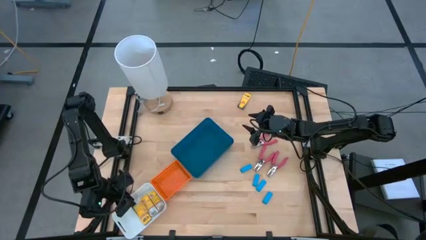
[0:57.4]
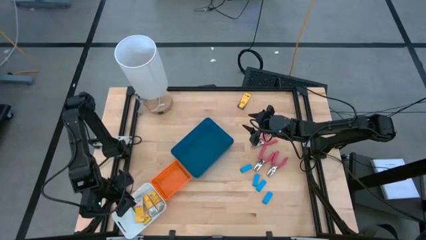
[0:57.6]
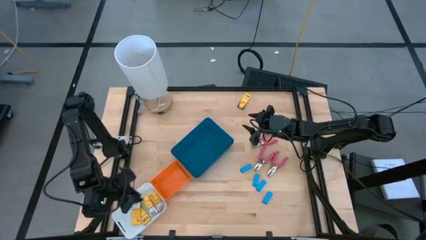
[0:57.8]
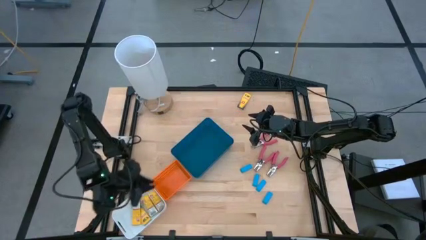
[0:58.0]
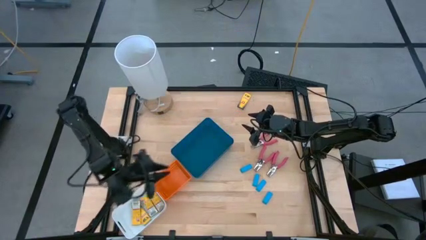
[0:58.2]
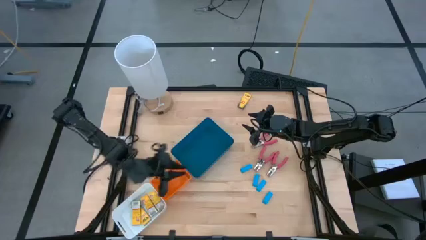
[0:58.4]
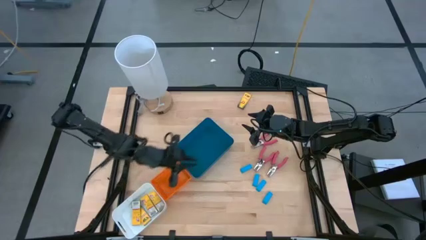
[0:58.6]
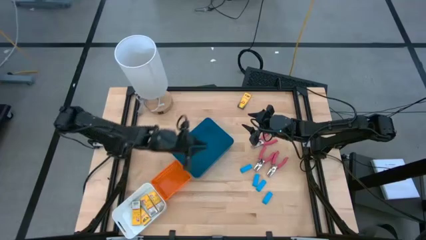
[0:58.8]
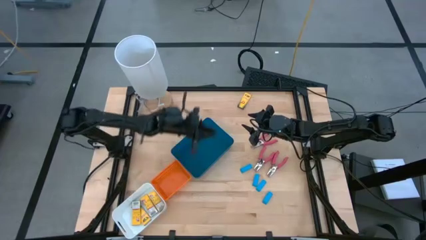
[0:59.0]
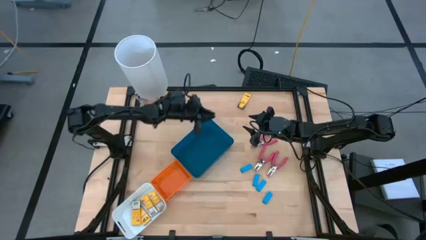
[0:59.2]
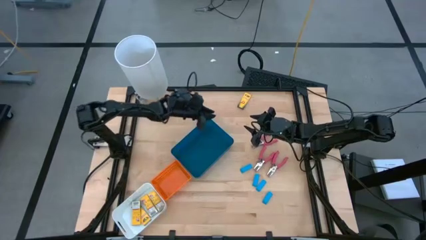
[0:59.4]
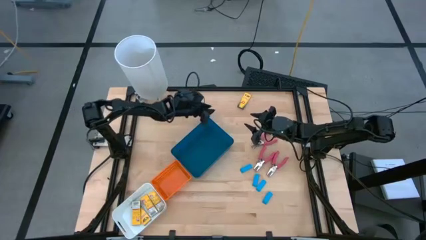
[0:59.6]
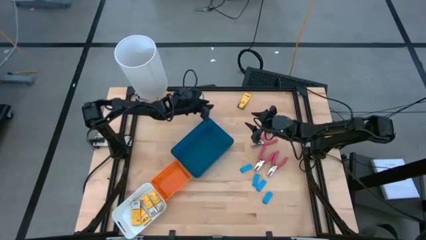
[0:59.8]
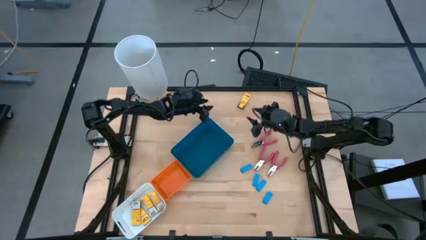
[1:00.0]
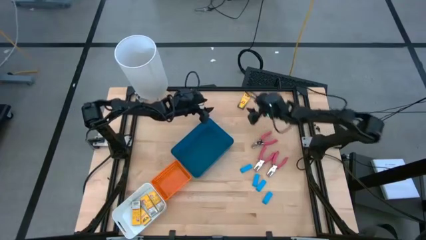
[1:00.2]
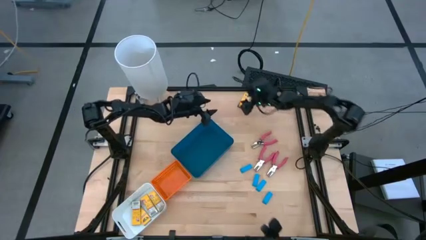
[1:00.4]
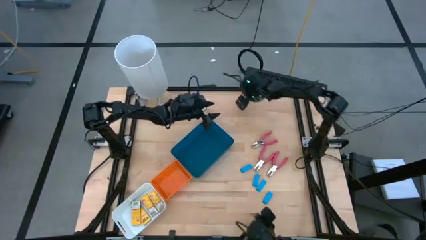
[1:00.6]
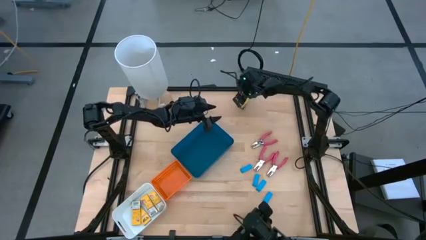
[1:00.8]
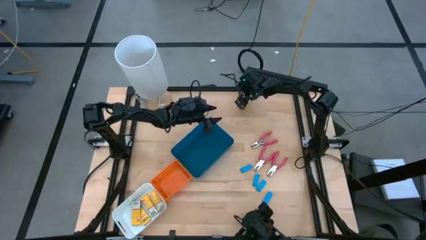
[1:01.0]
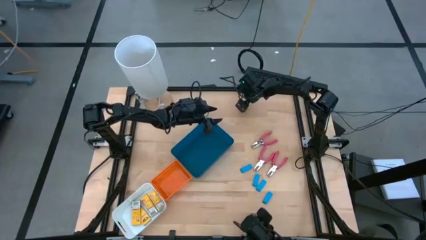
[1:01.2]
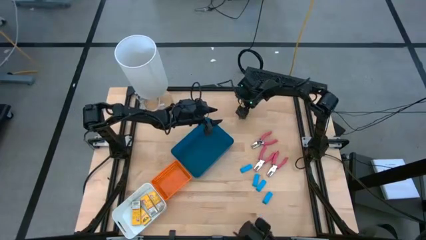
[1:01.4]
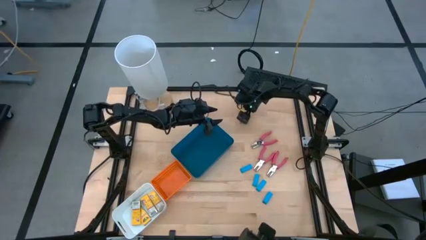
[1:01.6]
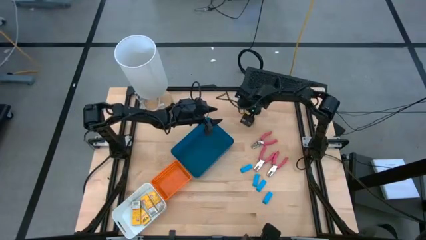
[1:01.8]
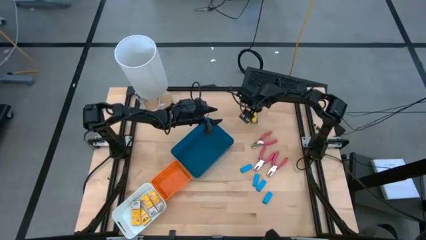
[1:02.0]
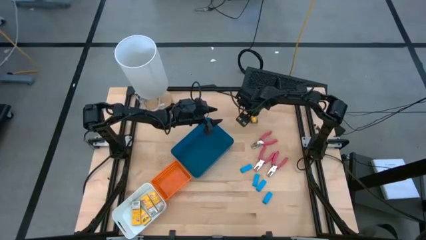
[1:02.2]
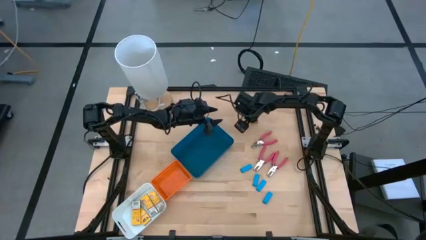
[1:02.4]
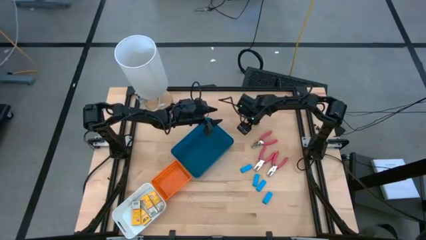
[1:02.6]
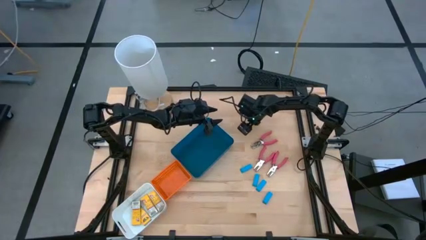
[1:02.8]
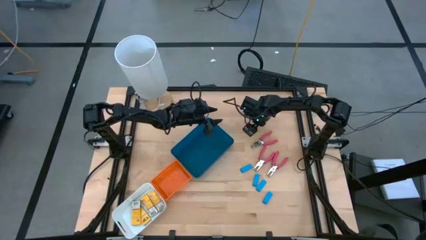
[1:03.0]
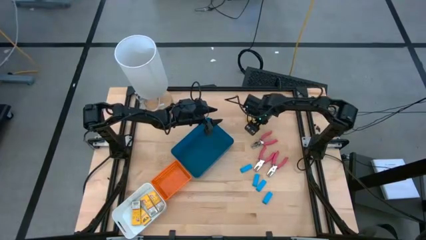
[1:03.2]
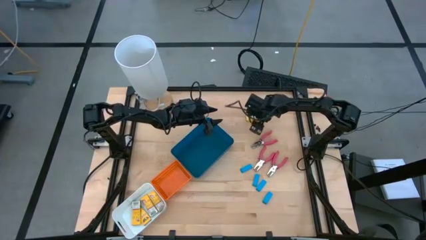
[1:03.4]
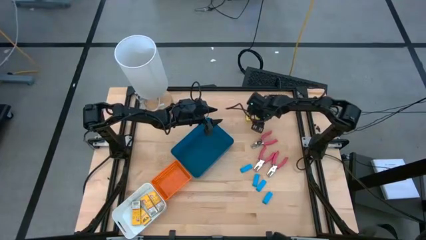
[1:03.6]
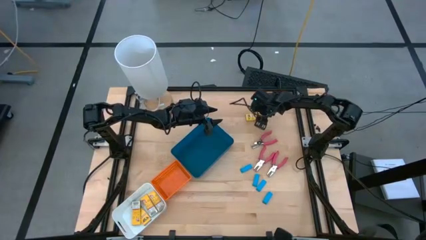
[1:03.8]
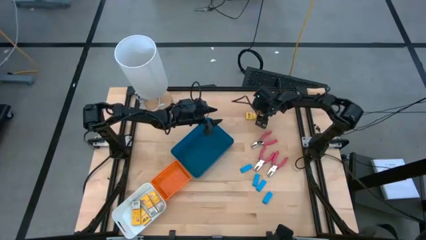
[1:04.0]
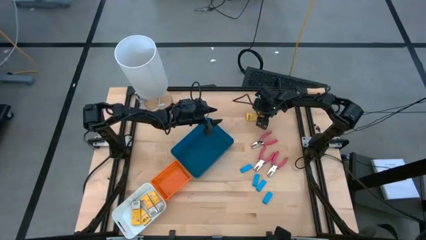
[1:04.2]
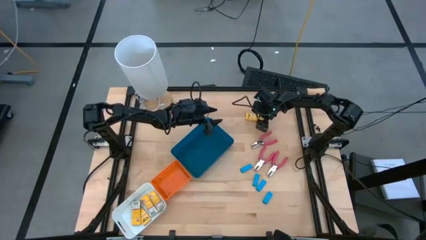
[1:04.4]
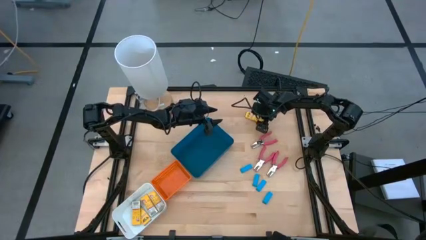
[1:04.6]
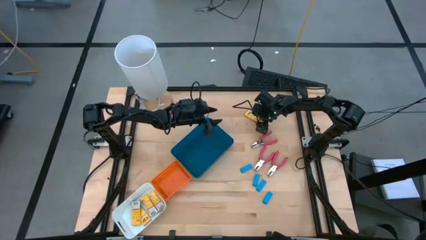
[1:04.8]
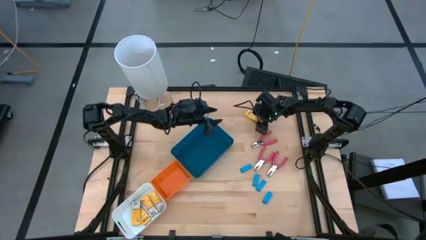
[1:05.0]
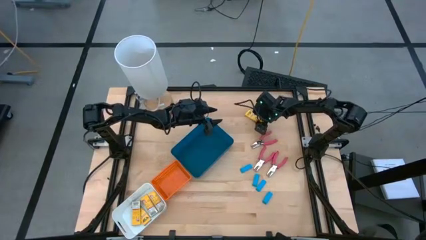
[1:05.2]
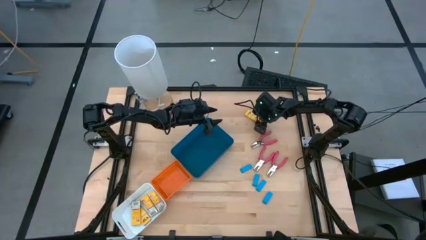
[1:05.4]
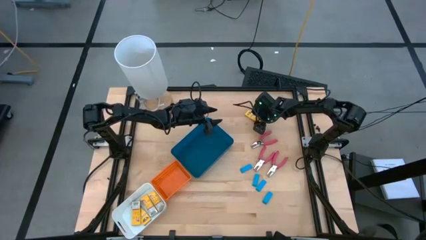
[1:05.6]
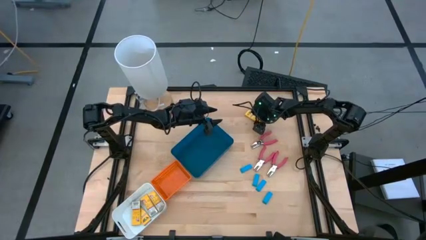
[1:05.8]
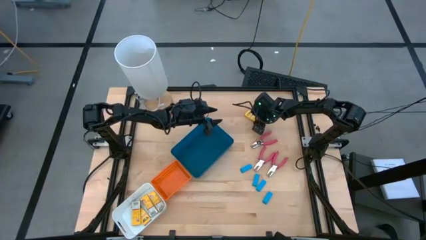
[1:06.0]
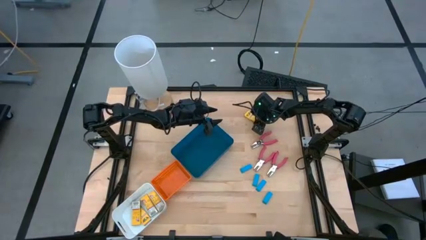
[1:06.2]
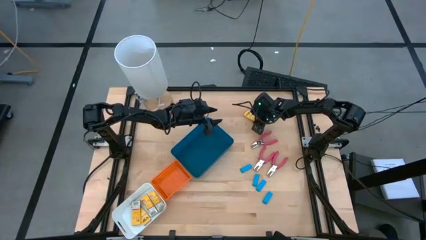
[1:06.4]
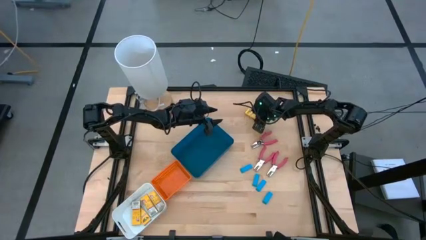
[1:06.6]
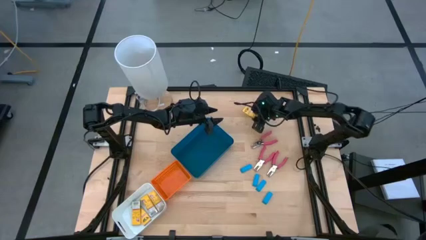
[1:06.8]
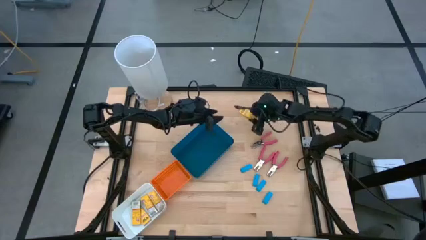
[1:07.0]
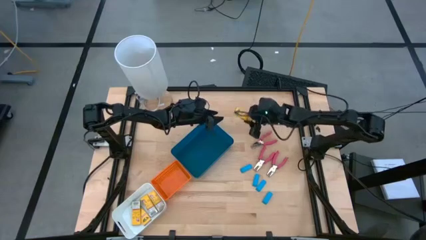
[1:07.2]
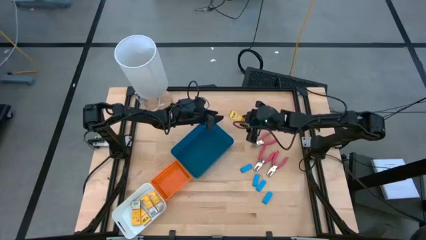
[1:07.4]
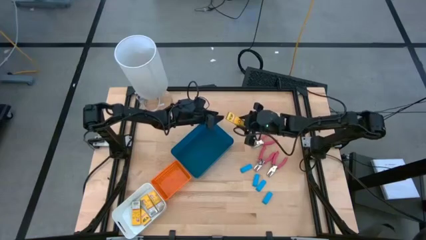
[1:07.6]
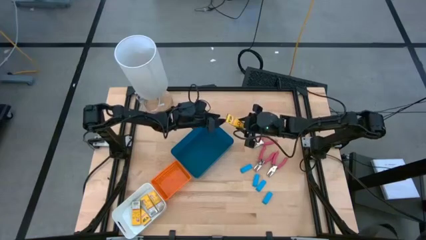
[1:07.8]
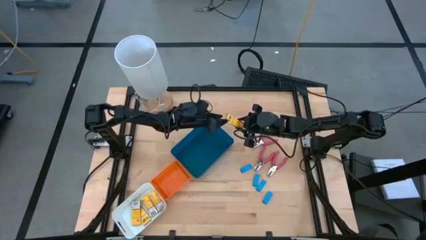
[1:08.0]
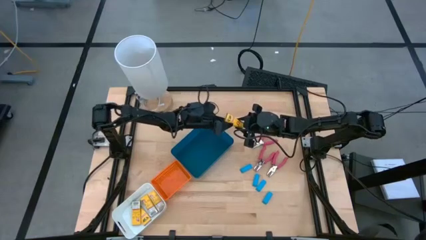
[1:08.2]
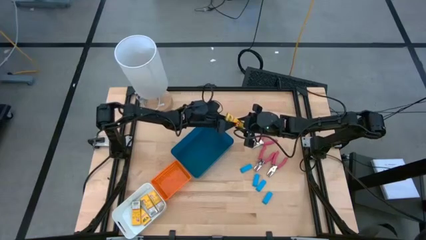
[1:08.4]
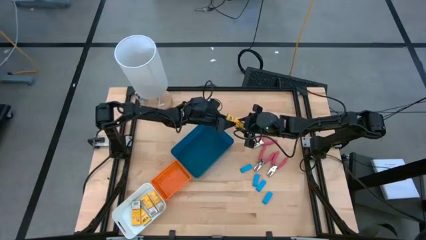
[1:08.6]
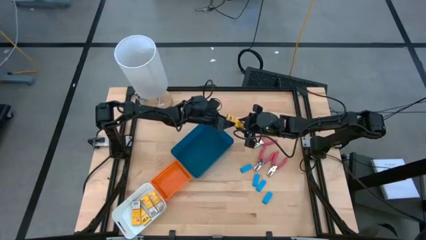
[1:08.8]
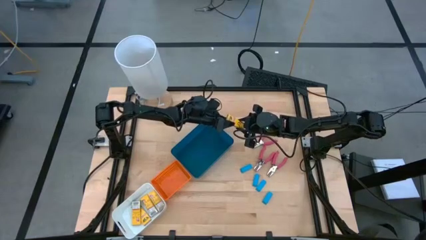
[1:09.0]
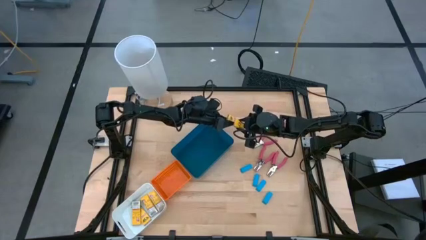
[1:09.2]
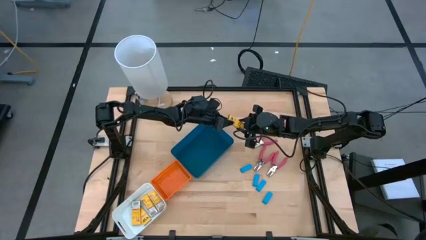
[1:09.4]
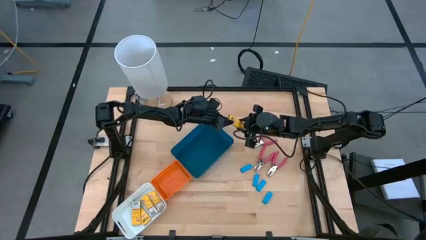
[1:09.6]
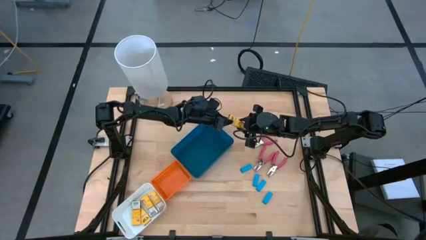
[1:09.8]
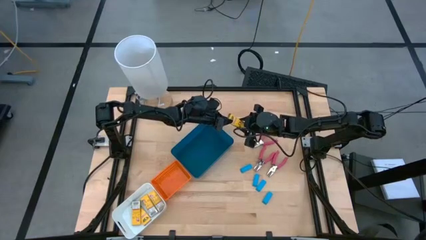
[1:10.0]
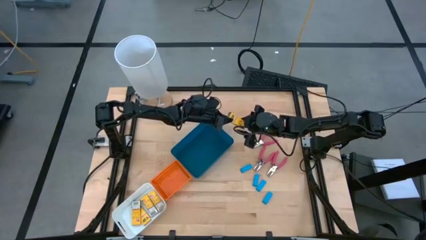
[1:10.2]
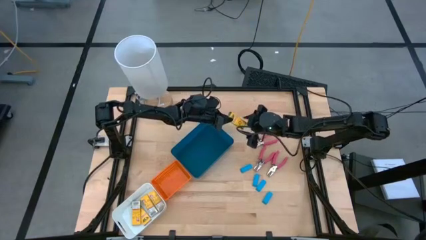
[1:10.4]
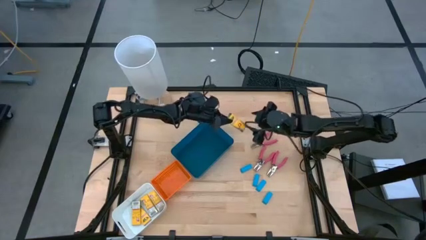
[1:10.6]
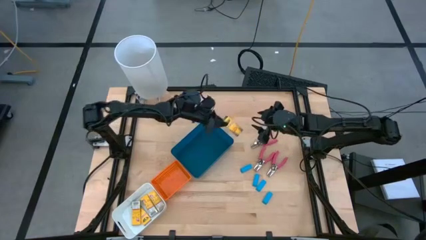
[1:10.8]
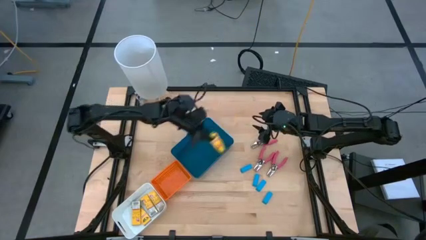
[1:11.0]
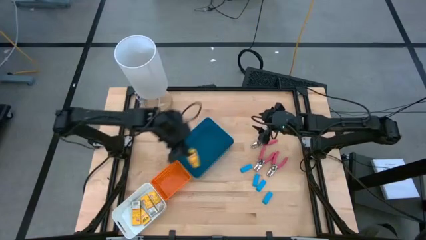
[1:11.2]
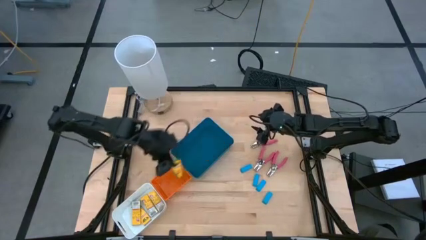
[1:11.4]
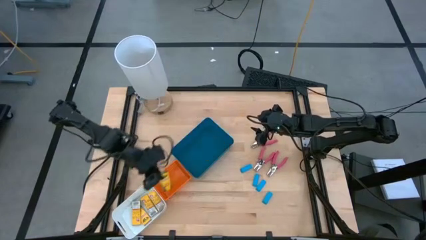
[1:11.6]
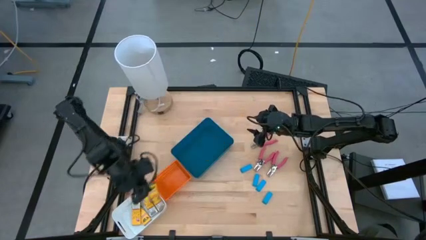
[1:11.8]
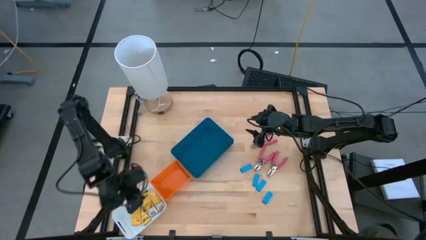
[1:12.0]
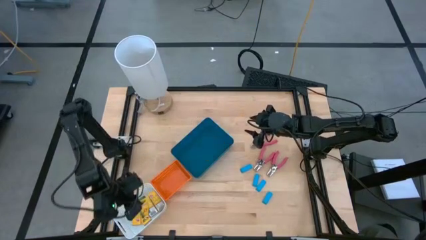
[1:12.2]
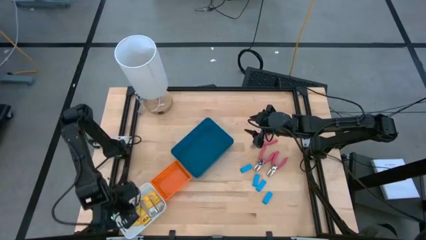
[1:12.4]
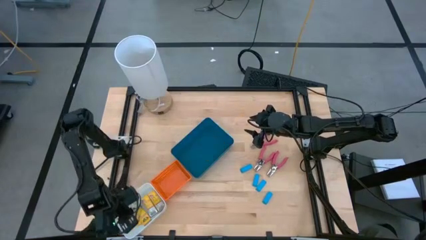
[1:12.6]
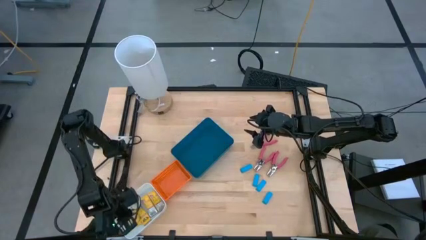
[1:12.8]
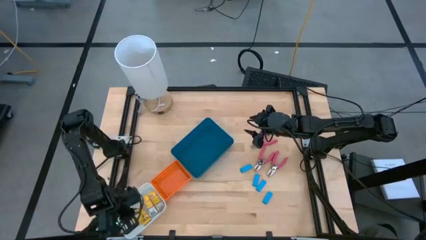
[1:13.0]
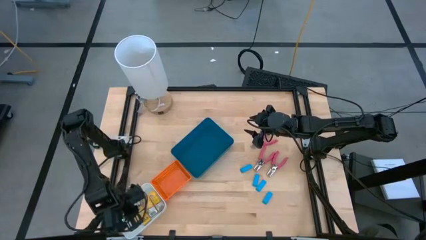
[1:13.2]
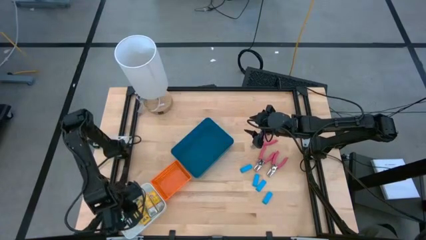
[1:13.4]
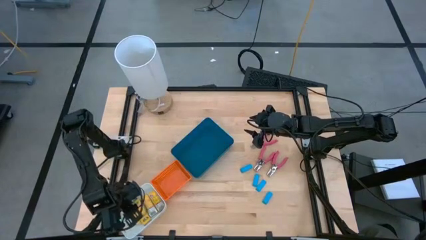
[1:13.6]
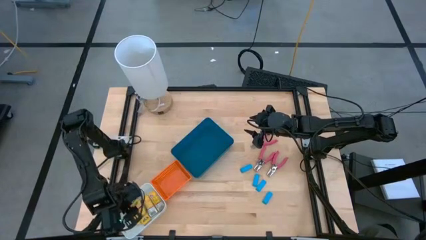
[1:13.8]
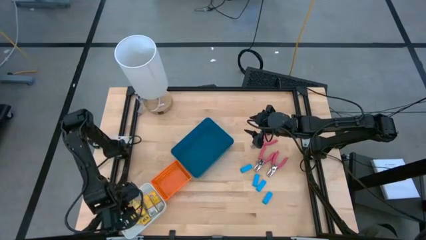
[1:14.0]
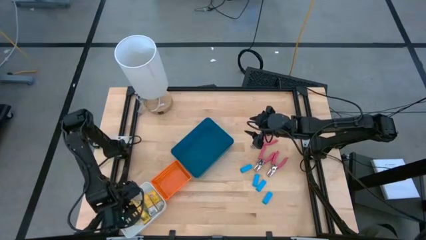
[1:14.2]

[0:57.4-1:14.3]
Task: Pick & Place School Supplies
Put the yellow crayon box into the white bin
